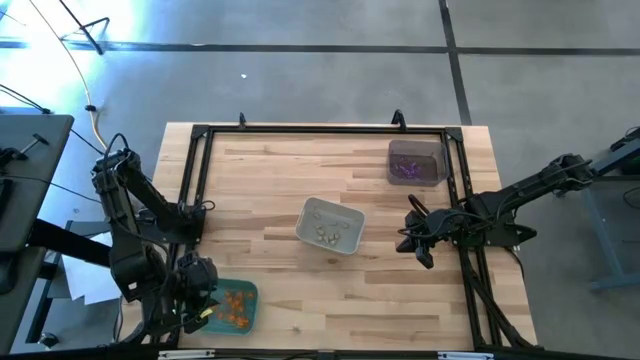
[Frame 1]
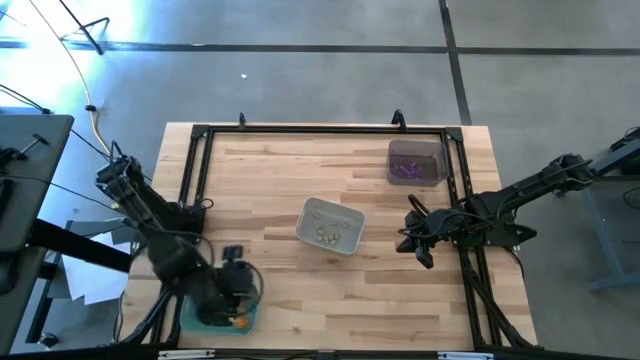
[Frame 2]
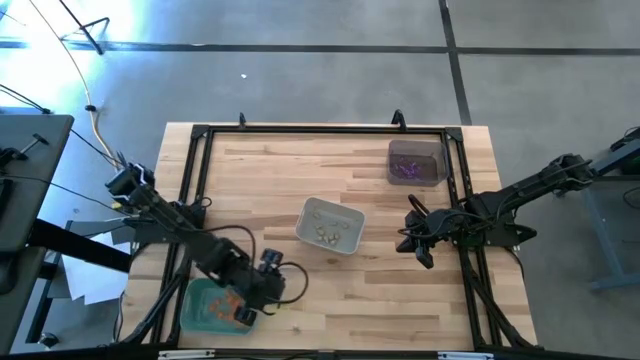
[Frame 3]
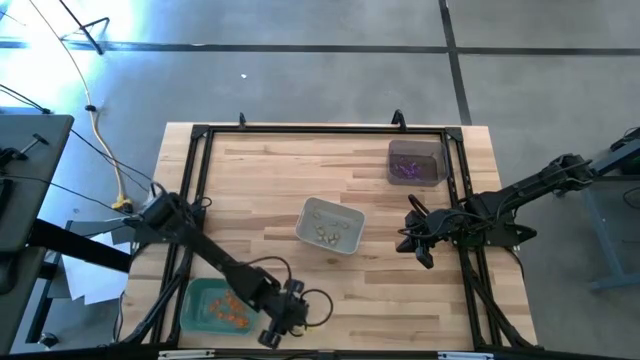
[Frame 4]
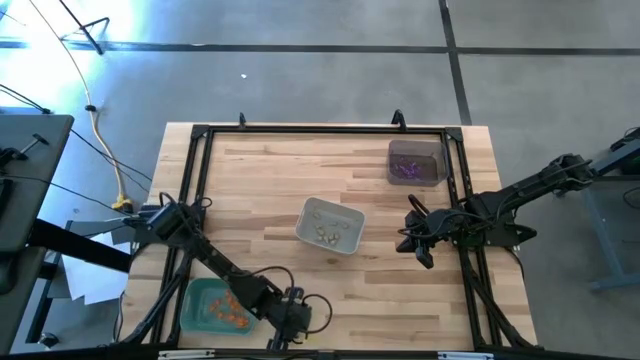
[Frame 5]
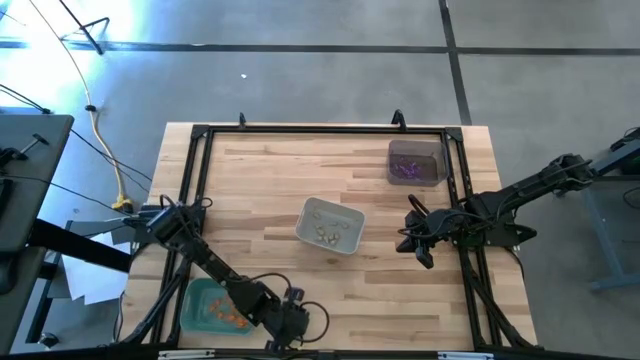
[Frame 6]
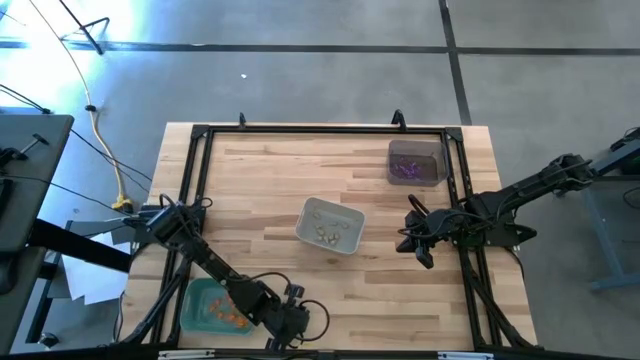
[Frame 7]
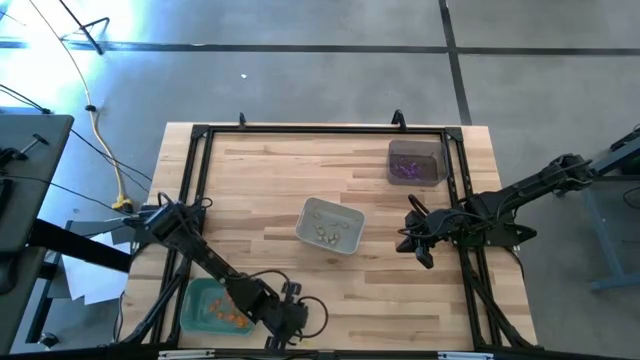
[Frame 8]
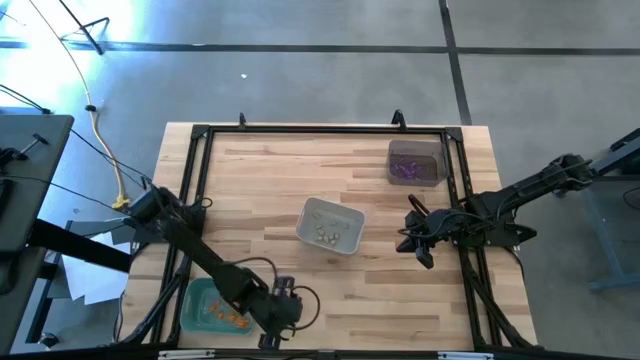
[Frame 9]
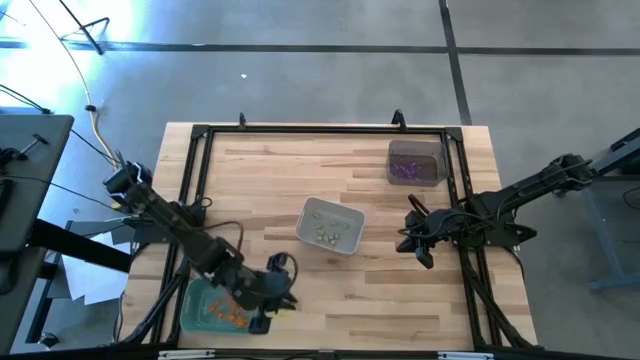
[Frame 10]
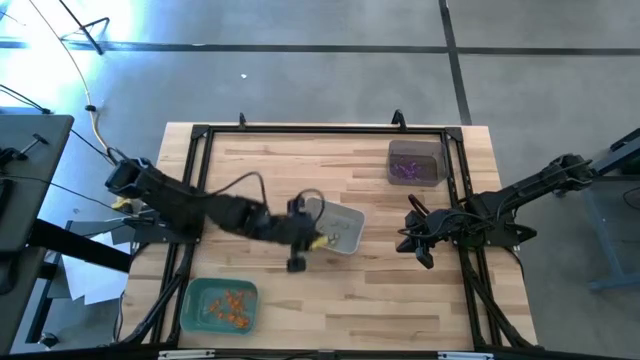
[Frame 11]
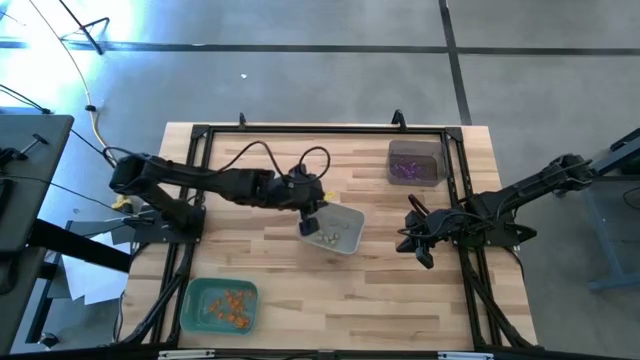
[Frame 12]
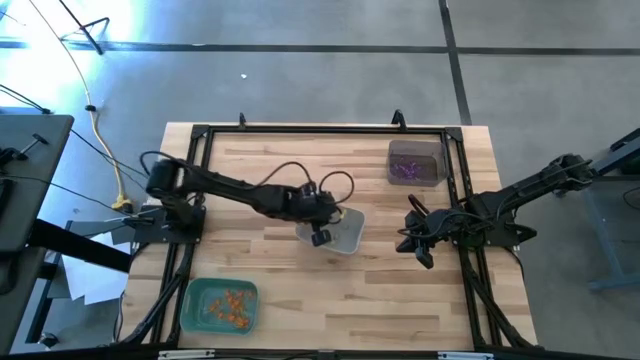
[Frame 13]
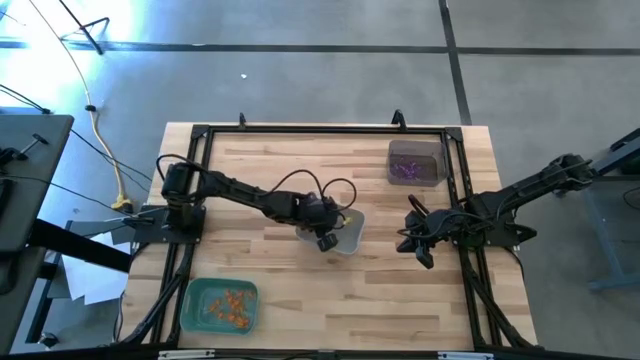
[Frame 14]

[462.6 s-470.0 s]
Task: Sort Halloween decoration
Put the white skull toy into the white bin

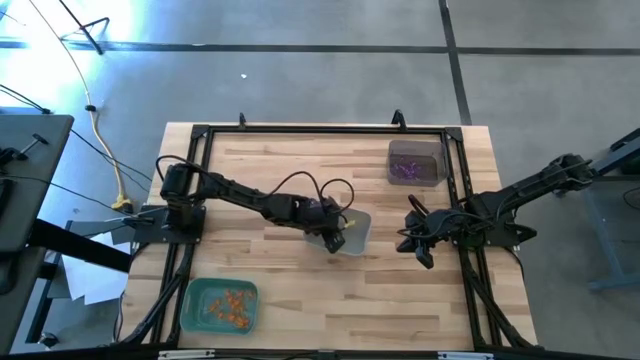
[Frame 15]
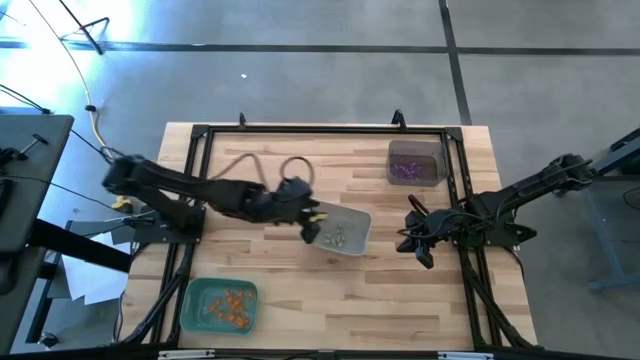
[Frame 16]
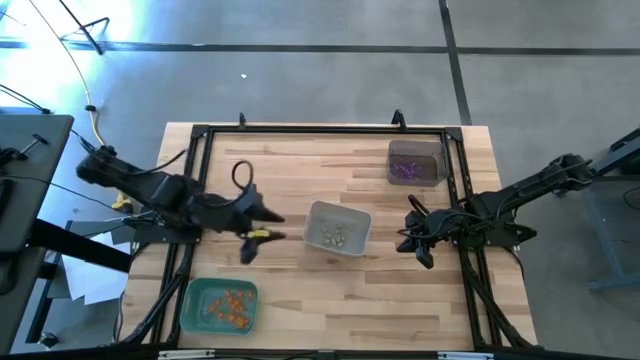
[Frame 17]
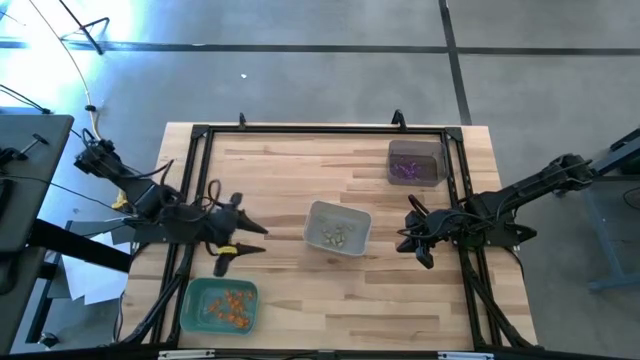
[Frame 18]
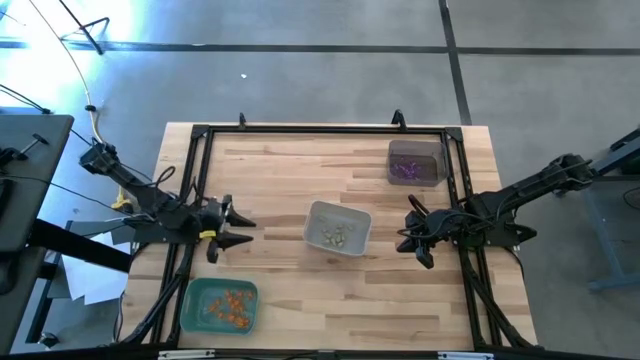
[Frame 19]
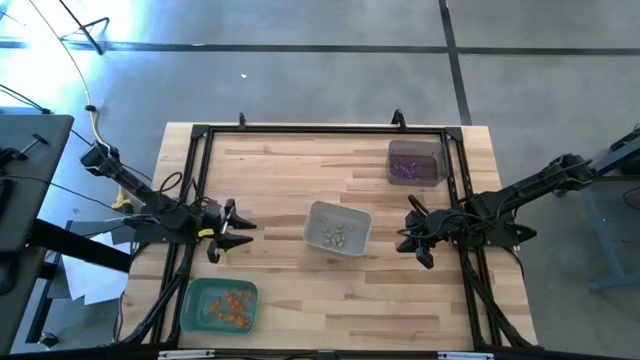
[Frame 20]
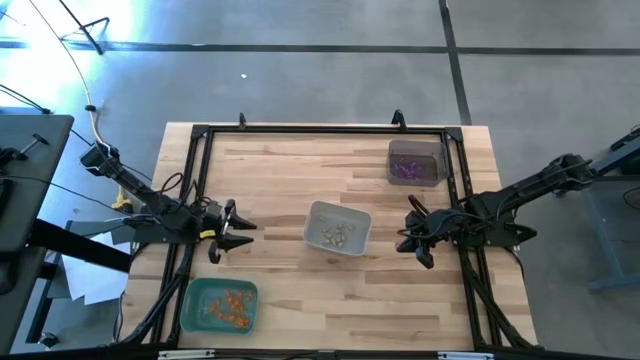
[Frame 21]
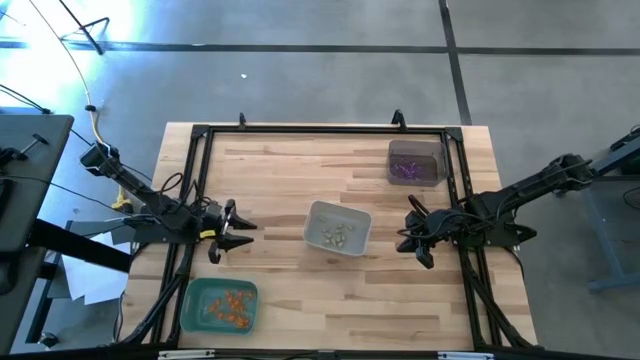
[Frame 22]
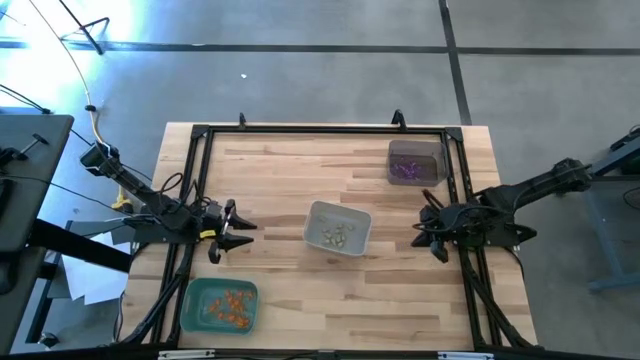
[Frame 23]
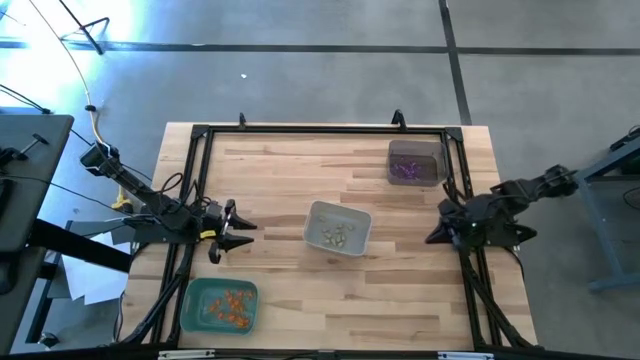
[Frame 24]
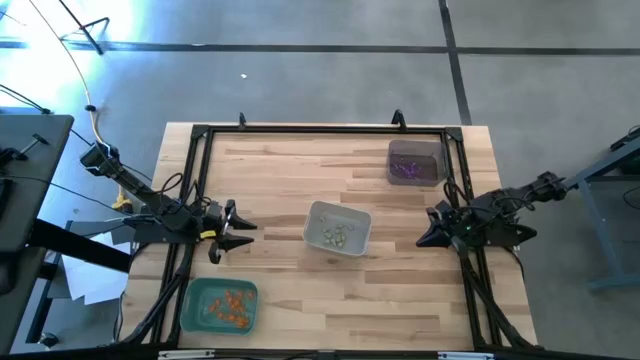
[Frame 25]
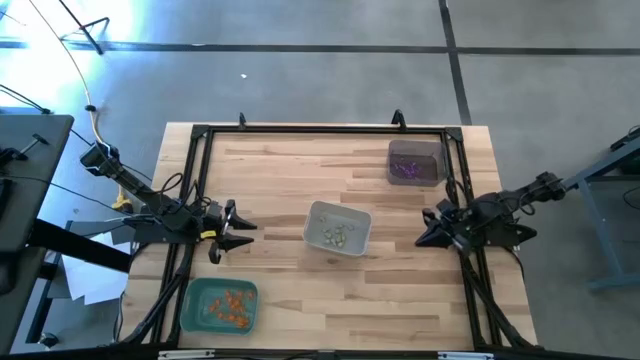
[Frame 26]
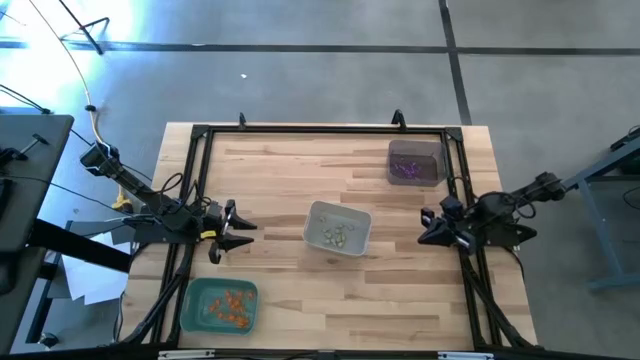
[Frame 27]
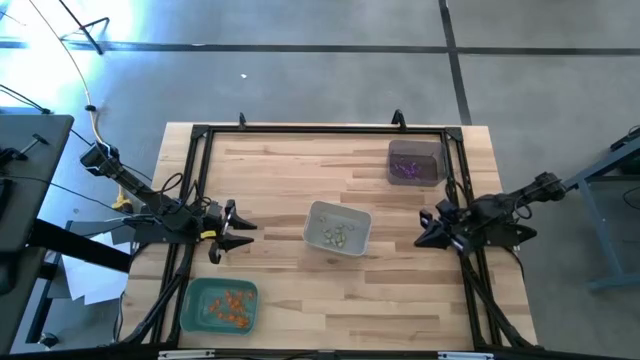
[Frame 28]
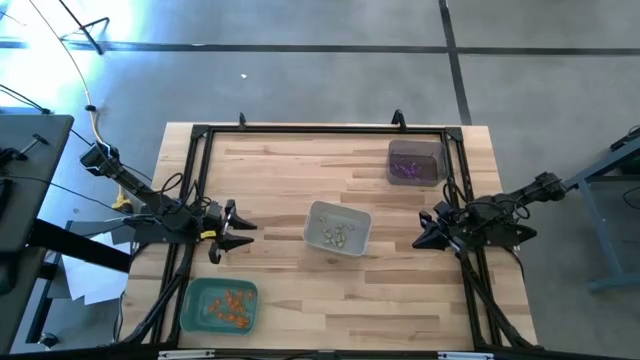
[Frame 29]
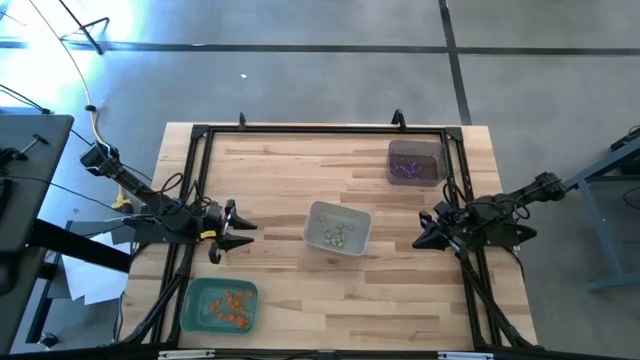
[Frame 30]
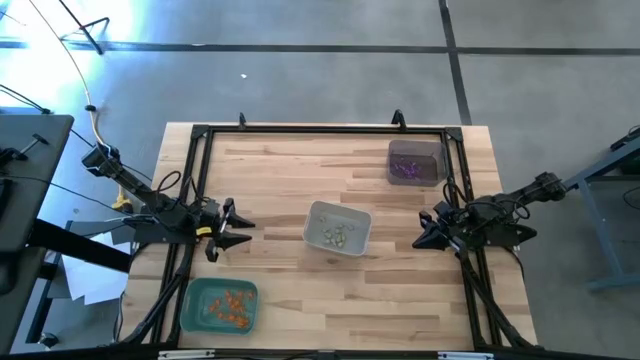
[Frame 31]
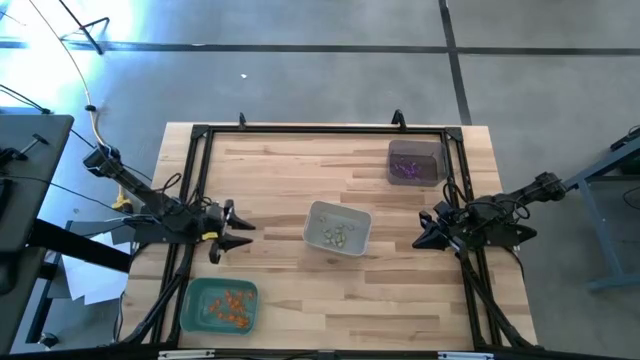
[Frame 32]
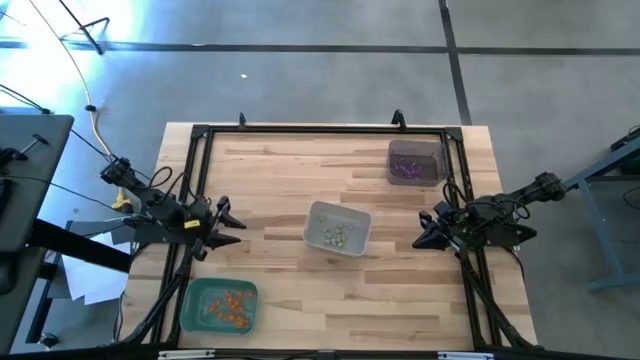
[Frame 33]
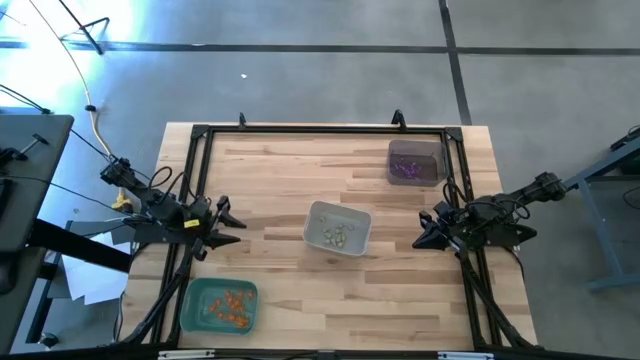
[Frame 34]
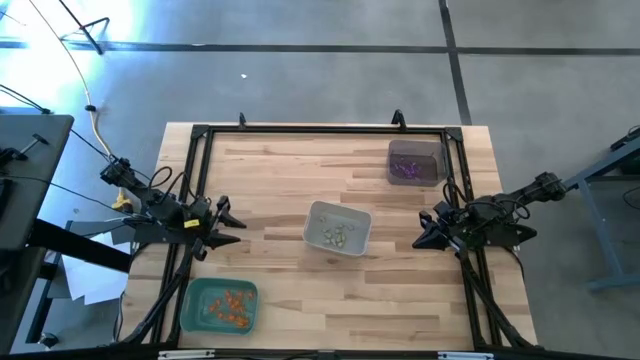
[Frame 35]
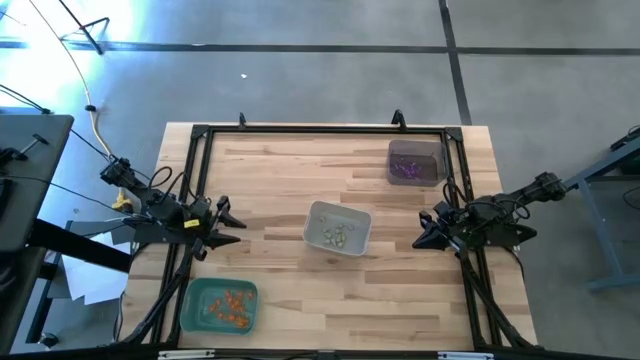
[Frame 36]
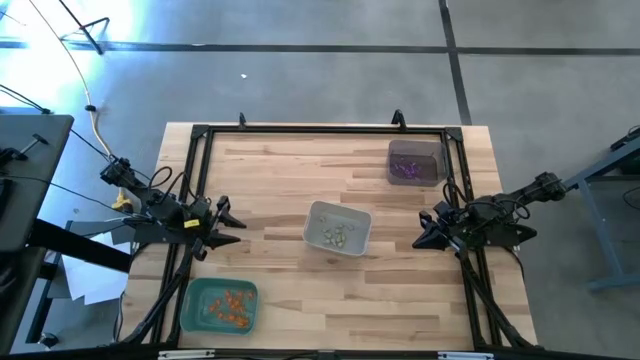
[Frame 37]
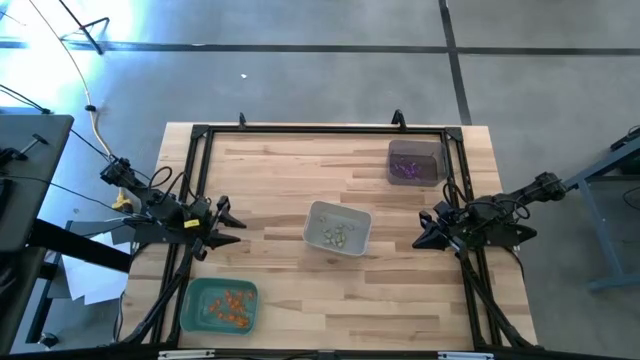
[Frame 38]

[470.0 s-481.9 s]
Return to Home Position

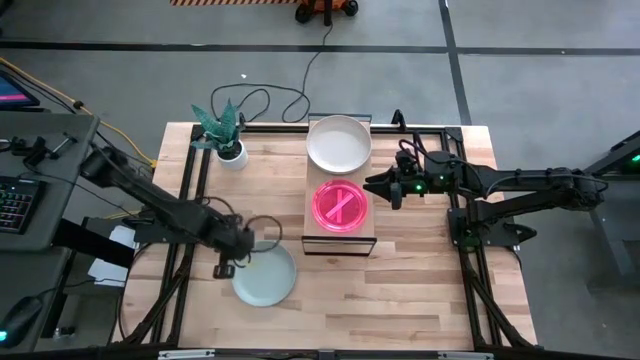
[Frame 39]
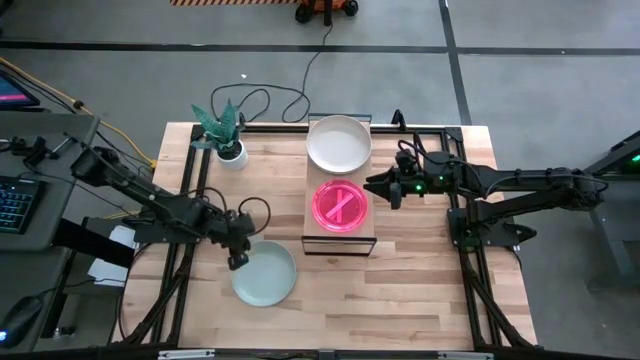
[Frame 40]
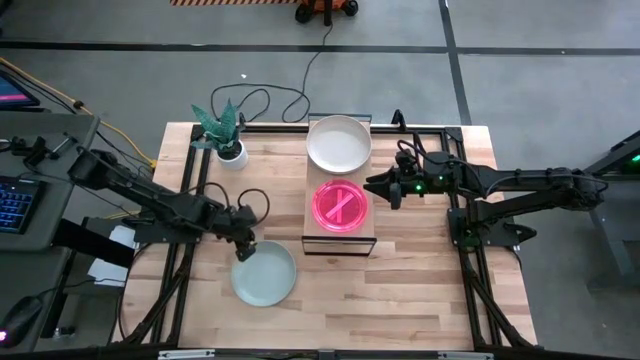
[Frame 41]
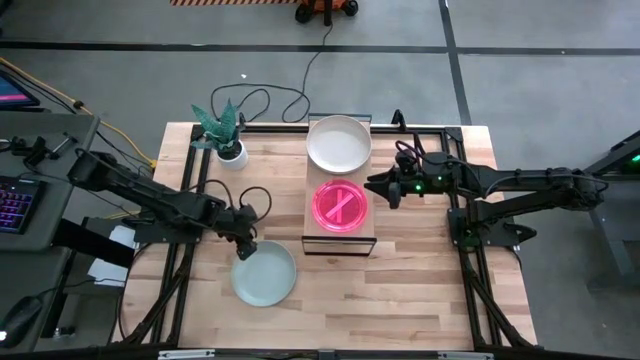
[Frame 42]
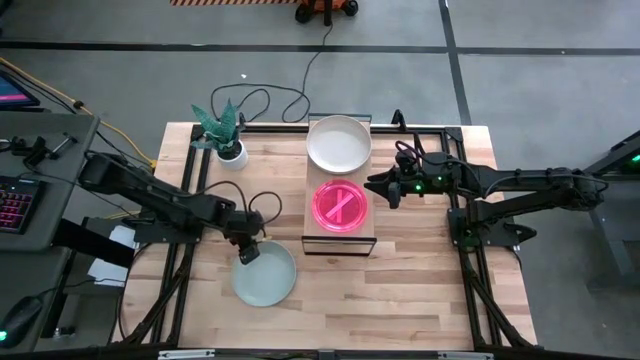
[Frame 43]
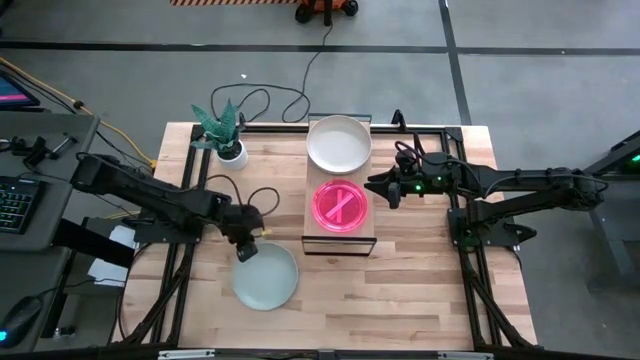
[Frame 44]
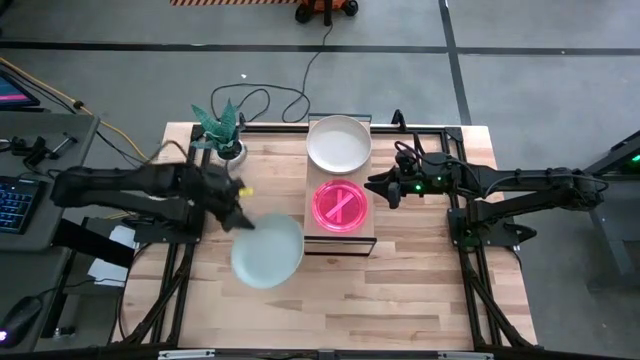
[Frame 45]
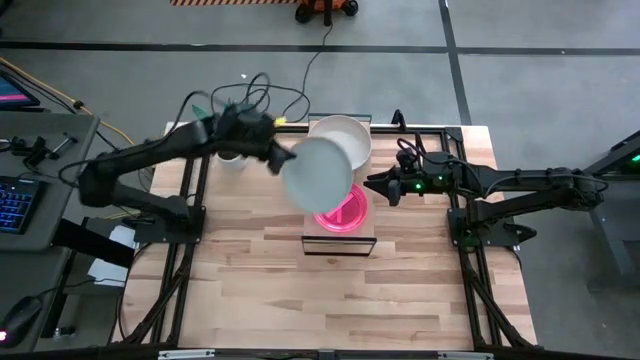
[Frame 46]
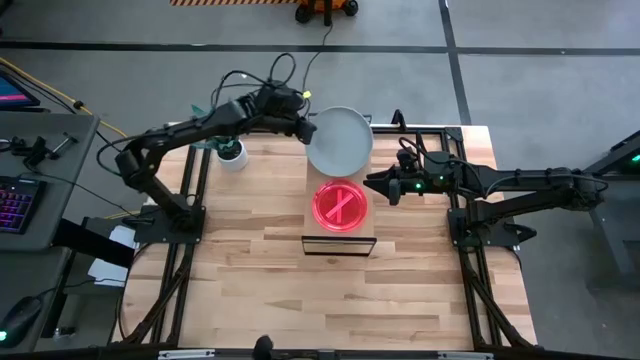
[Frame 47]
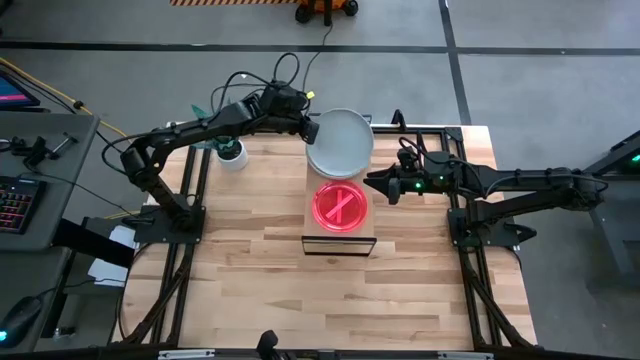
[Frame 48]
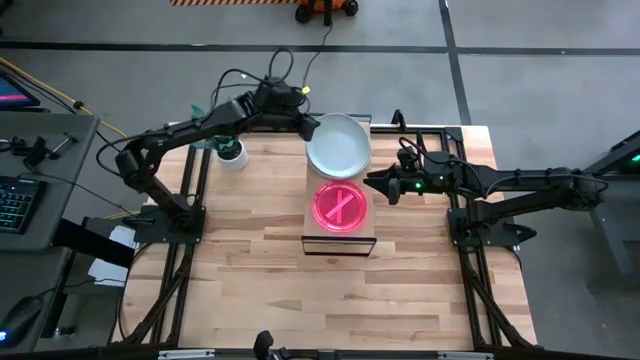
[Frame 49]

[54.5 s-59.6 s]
Task: Place and stack plates onto a shelf
Stack the white plate on top of the off white plate on the shelf
